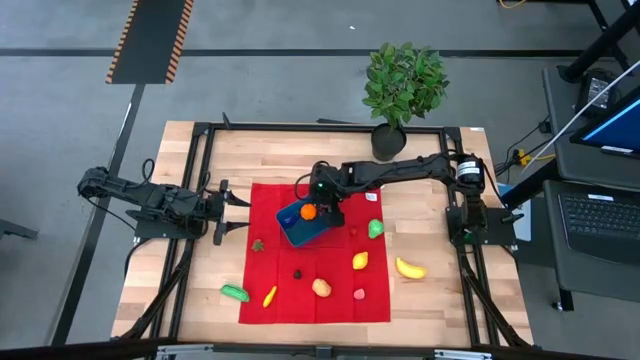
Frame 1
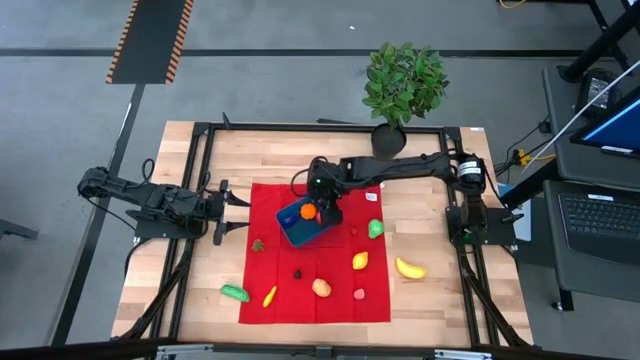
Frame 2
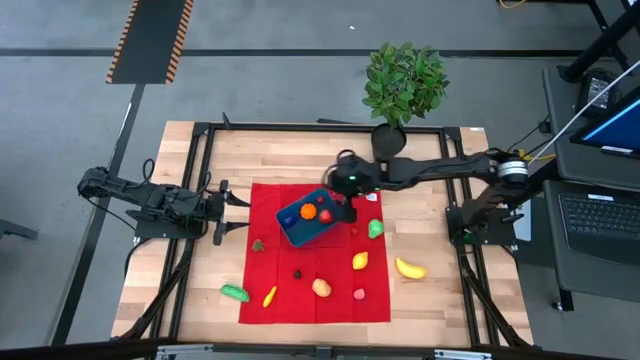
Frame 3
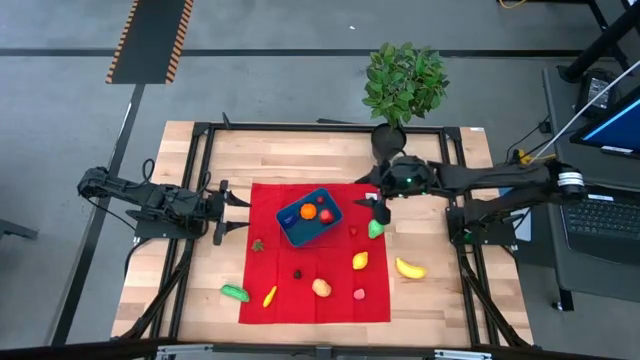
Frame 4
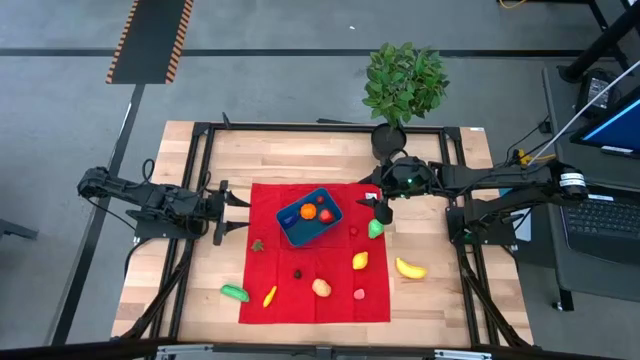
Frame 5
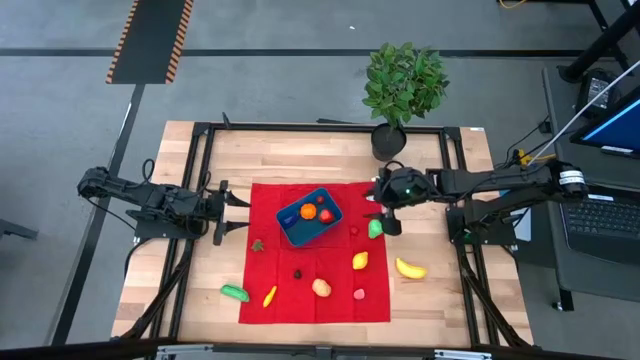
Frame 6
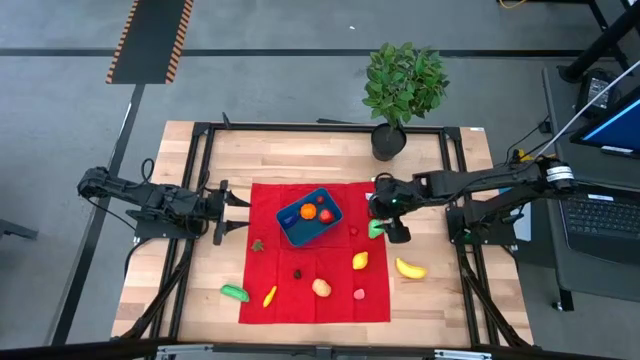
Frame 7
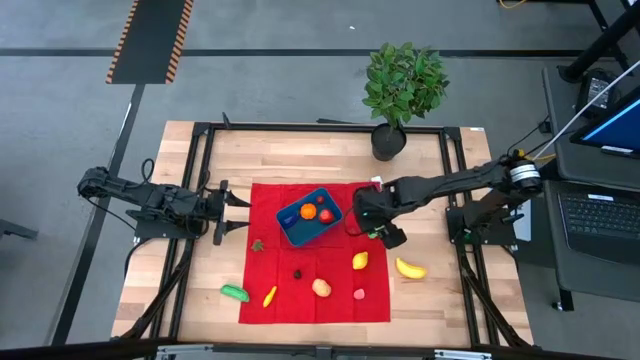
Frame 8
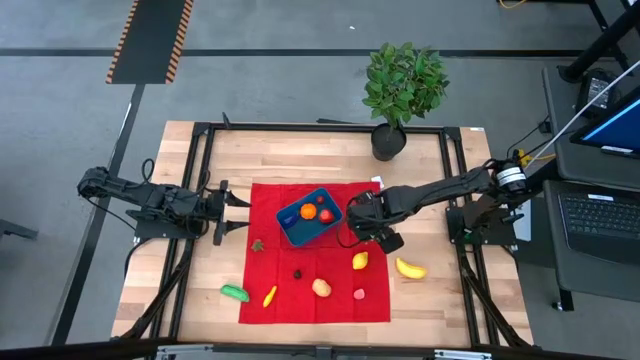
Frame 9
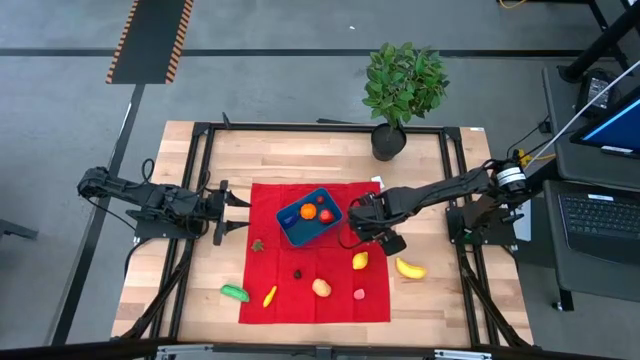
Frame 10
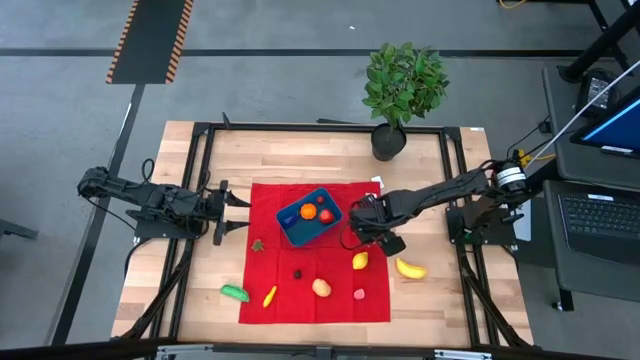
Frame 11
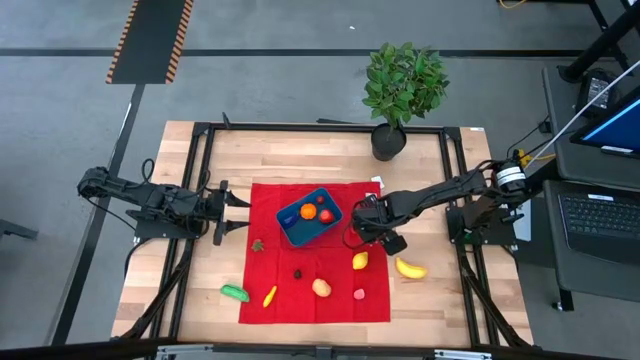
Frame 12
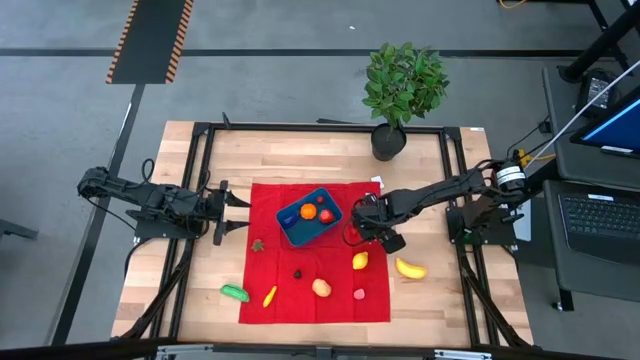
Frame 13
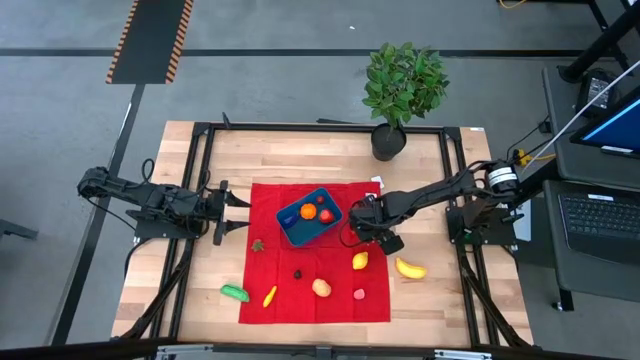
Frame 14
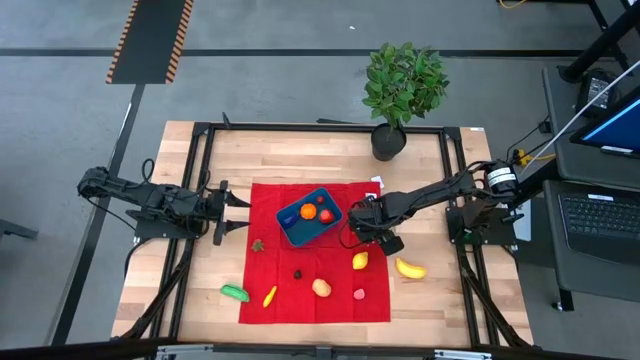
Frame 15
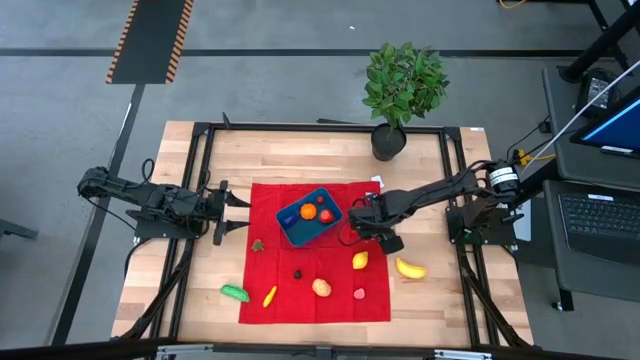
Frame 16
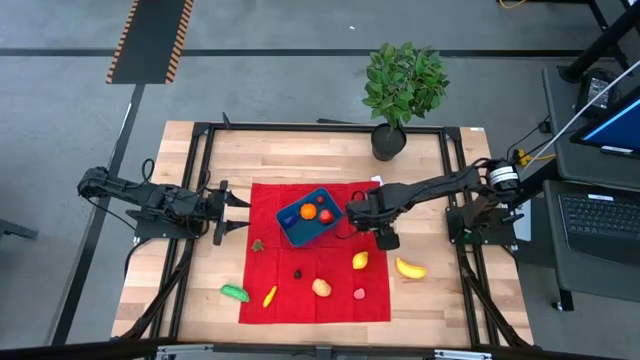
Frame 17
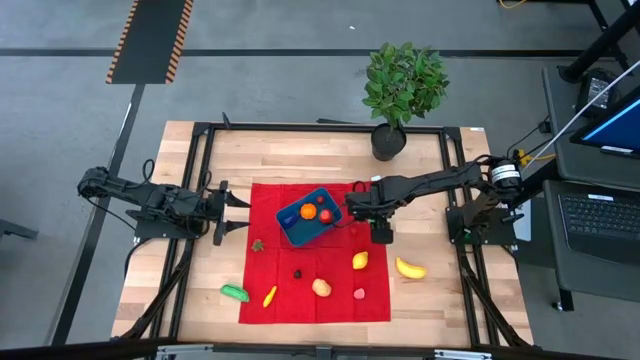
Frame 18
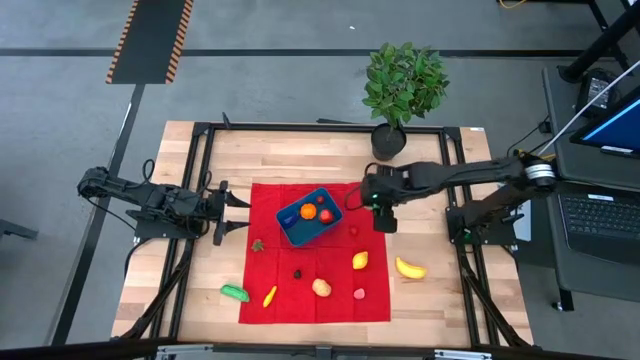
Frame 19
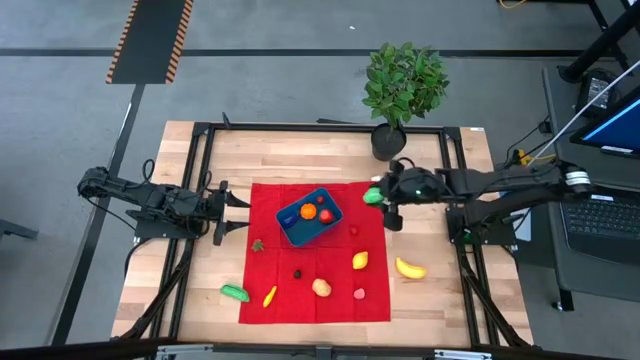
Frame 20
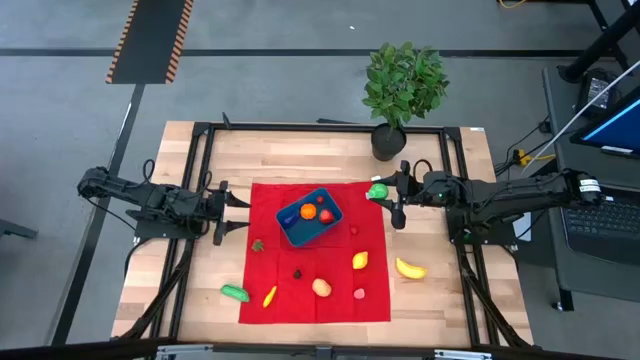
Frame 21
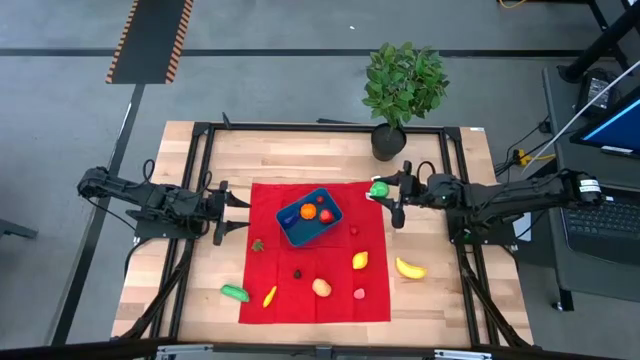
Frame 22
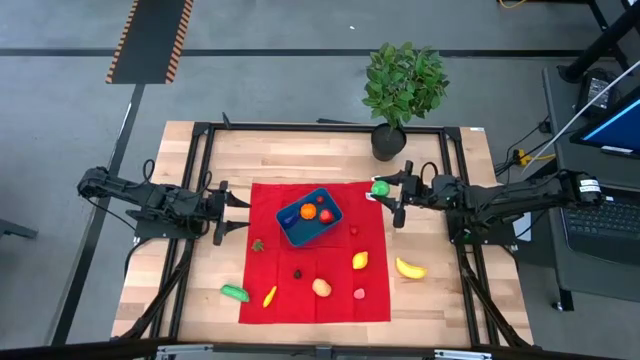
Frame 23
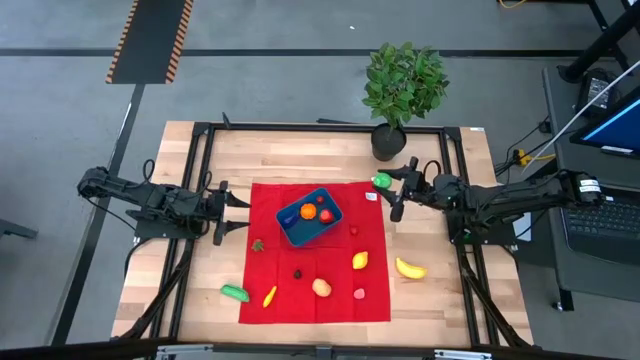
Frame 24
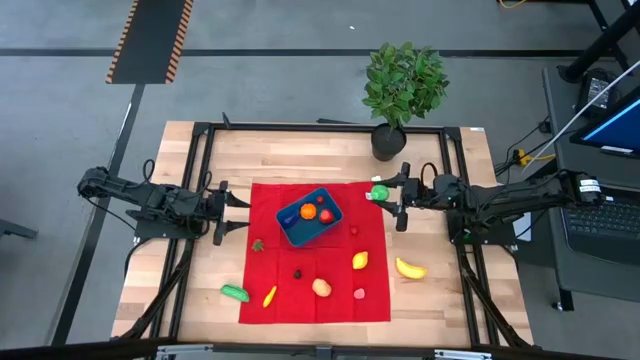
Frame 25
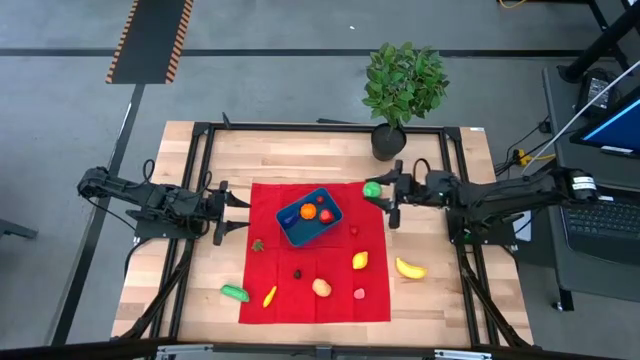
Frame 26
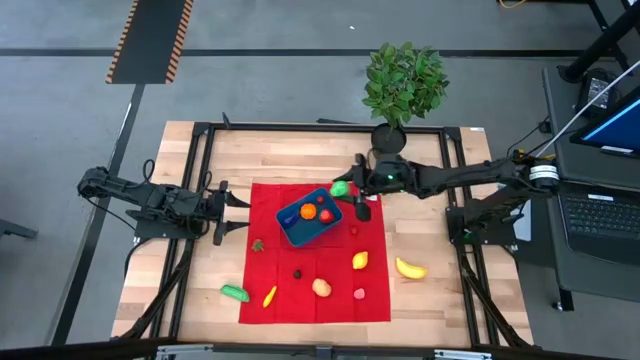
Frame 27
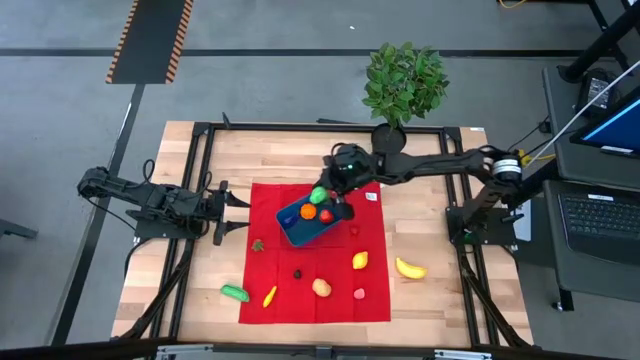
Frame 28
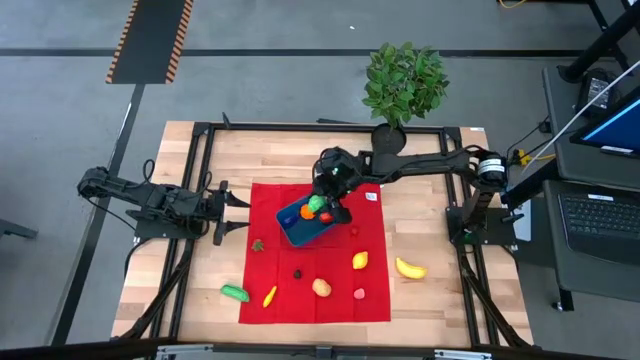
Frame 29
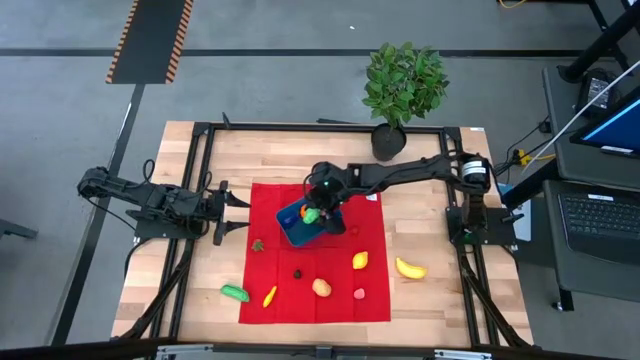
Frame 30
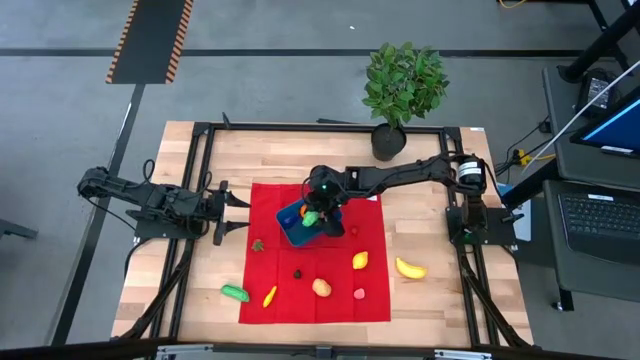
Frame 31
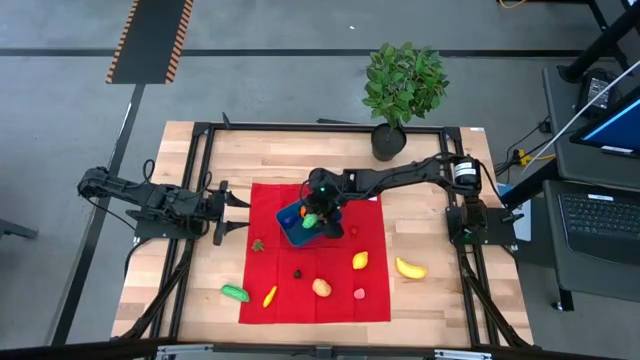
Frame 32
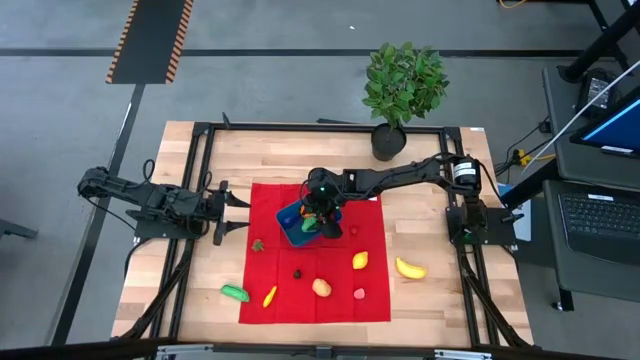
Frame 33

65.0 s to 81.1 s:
Task: Pick and placing Produce into tupperware
Put the pear into the blue bin

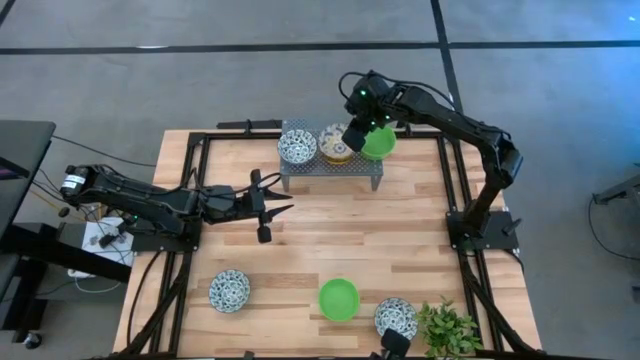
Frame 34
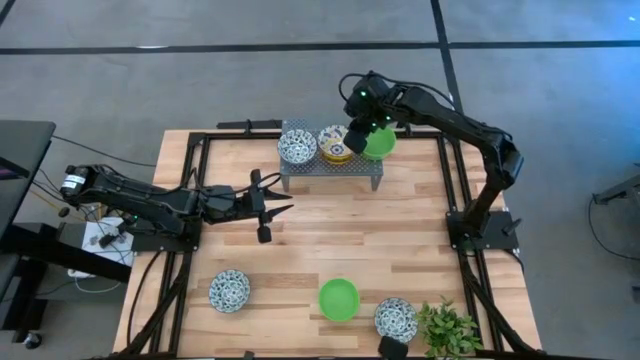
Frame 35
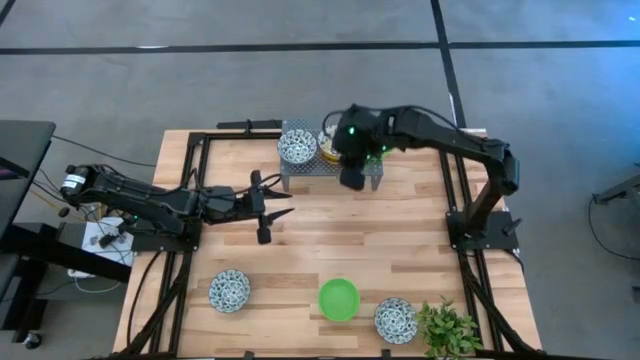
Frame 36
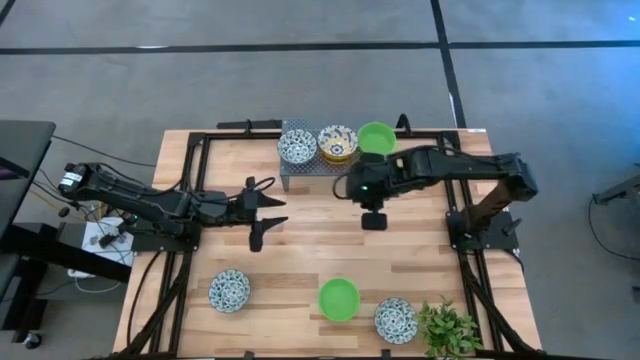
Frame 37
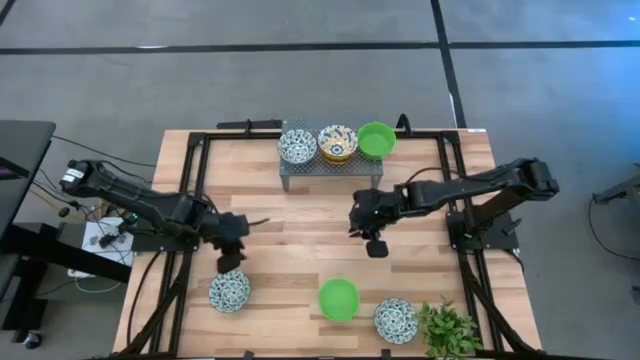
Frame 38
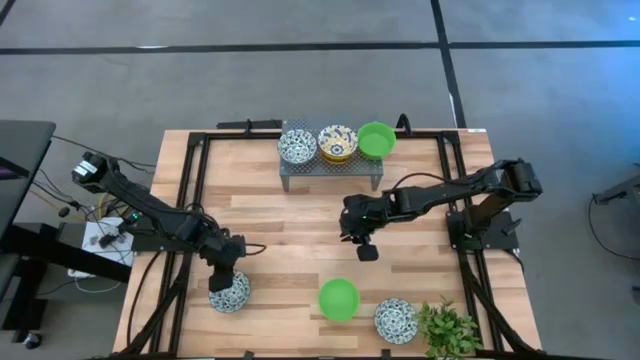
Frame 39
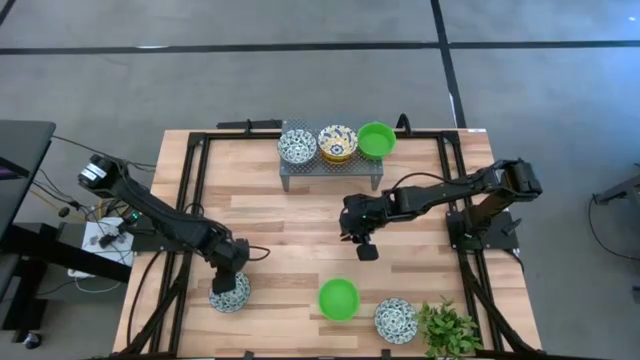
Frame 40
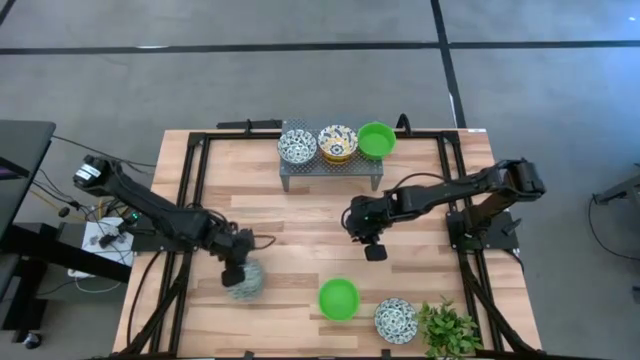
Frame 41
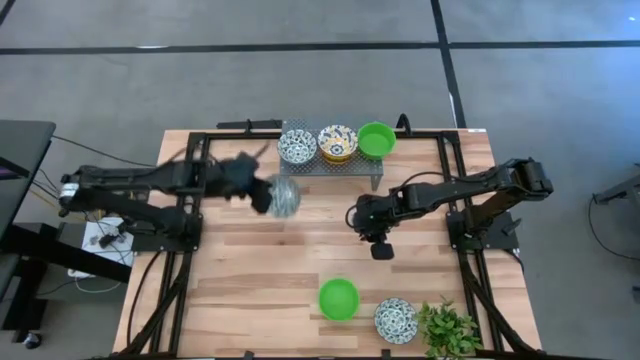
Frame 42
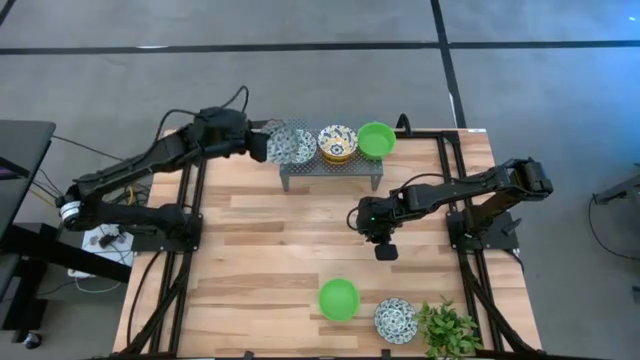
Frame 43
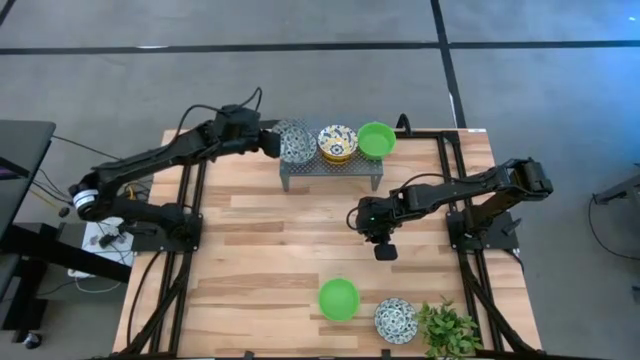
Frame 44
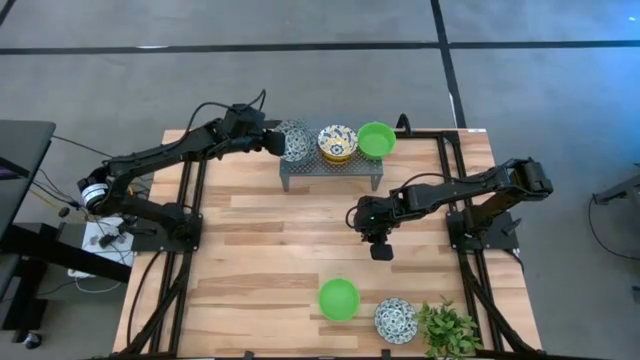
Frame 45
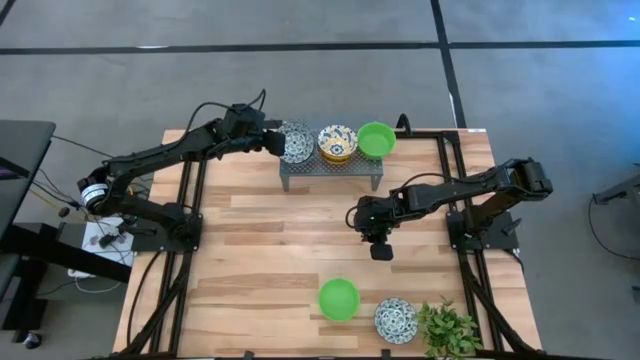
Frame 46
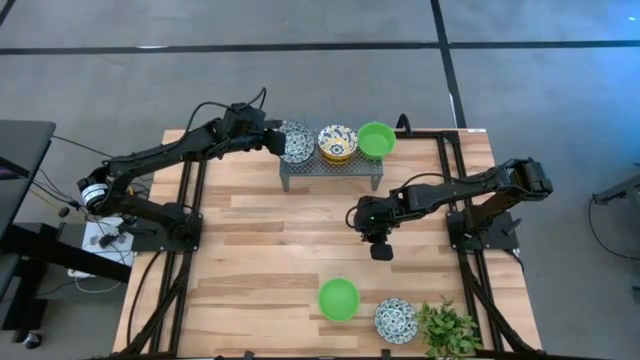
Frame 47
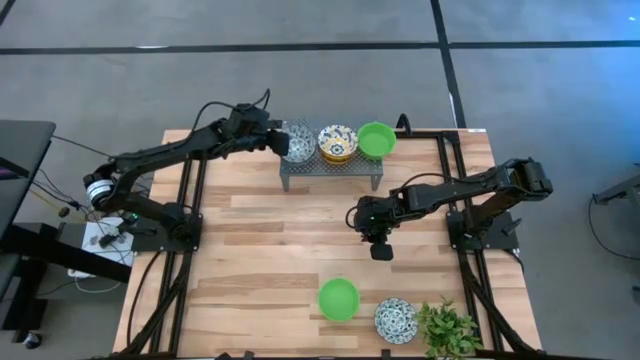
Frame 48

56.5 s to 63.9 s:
Task: Pick & Place Mini bowls
Stack the blue patterned bowl on the blue patterned bowl on the shelf
